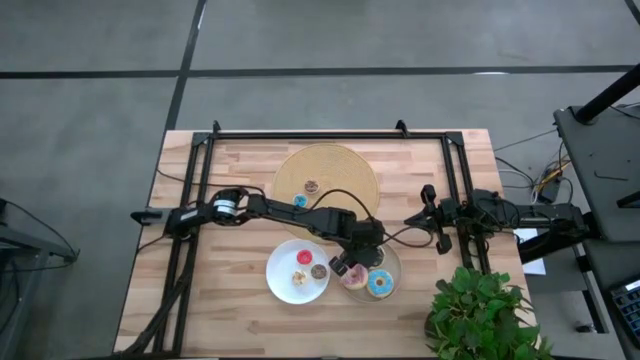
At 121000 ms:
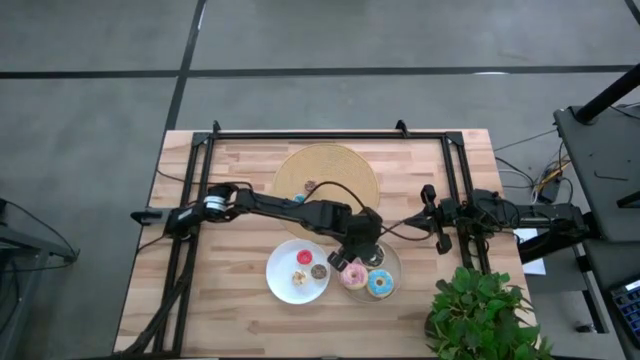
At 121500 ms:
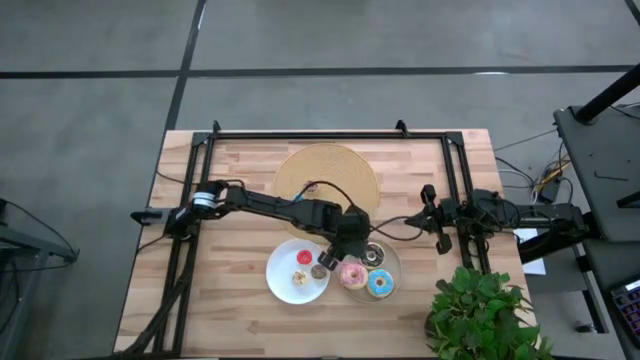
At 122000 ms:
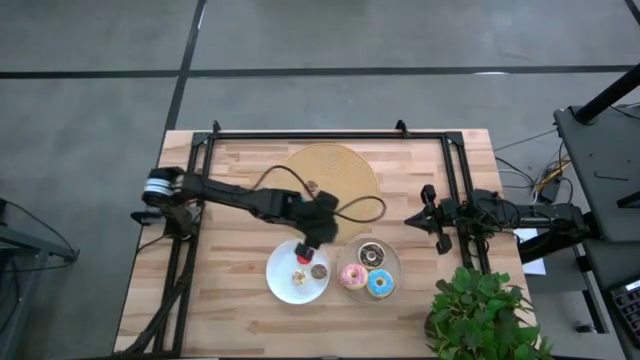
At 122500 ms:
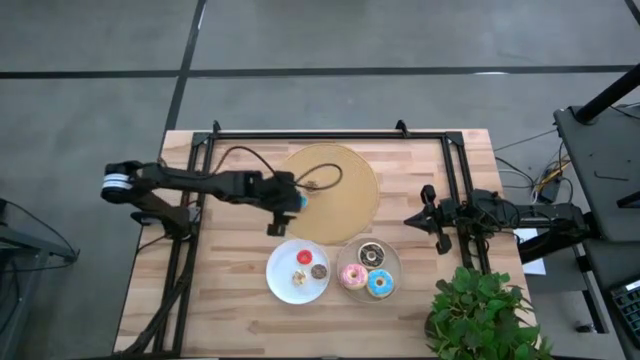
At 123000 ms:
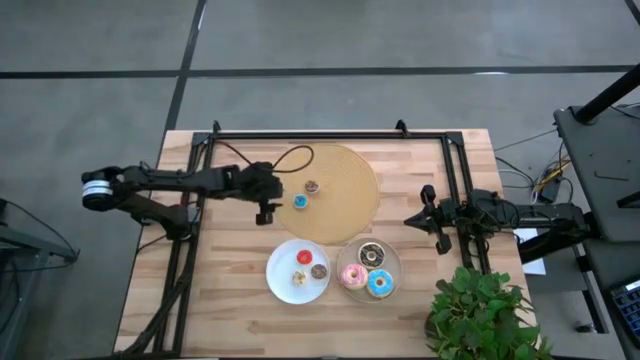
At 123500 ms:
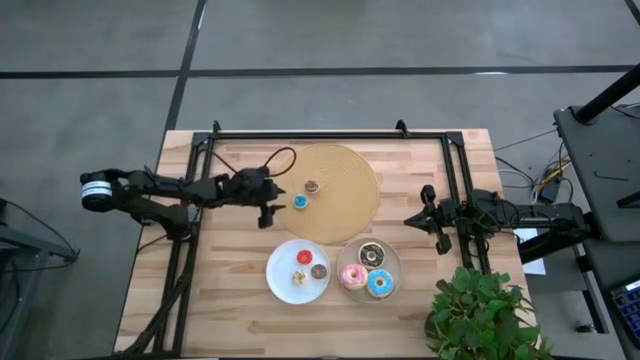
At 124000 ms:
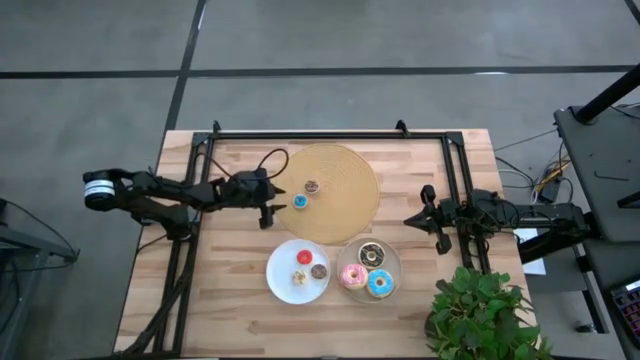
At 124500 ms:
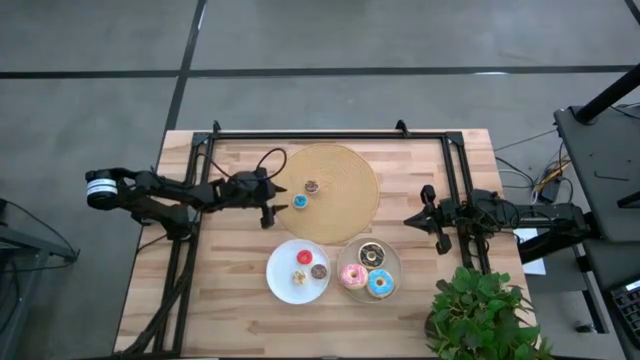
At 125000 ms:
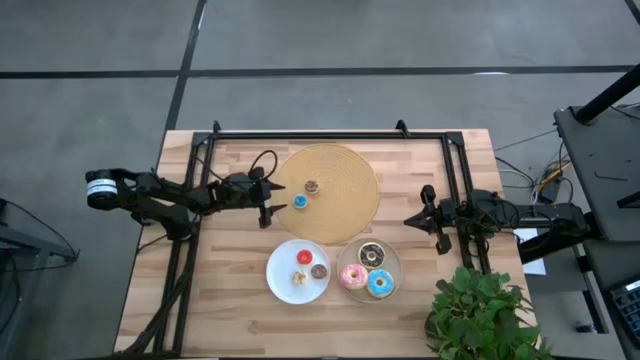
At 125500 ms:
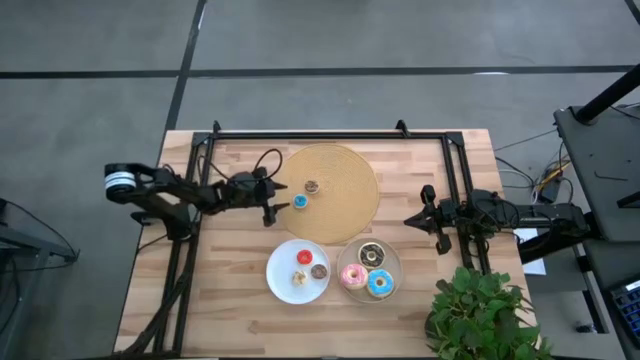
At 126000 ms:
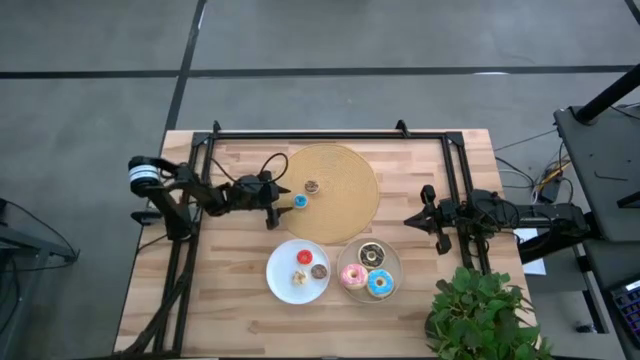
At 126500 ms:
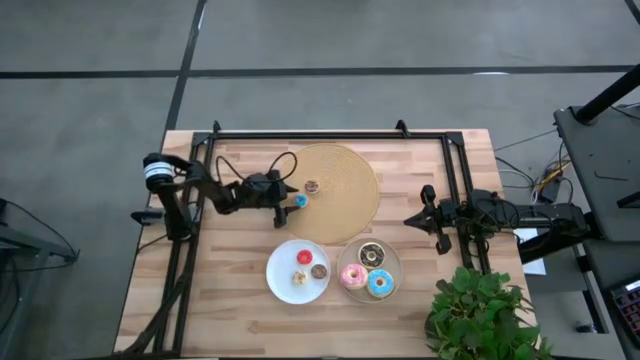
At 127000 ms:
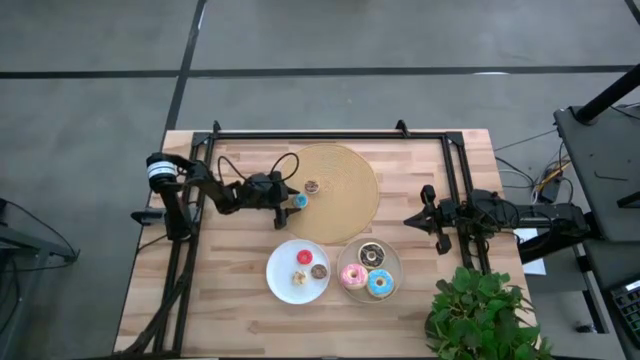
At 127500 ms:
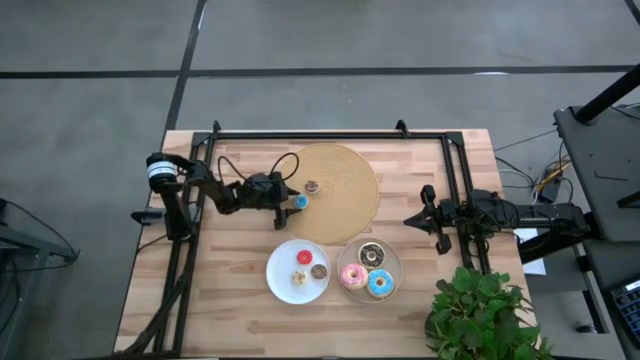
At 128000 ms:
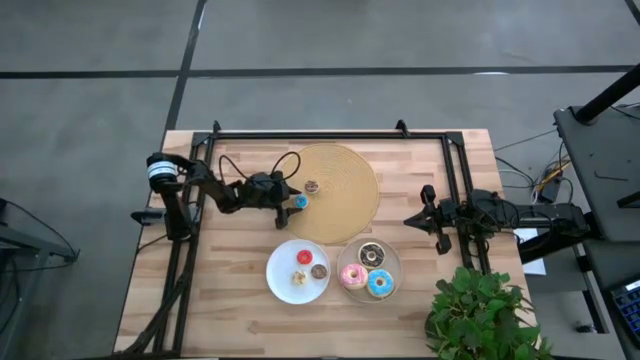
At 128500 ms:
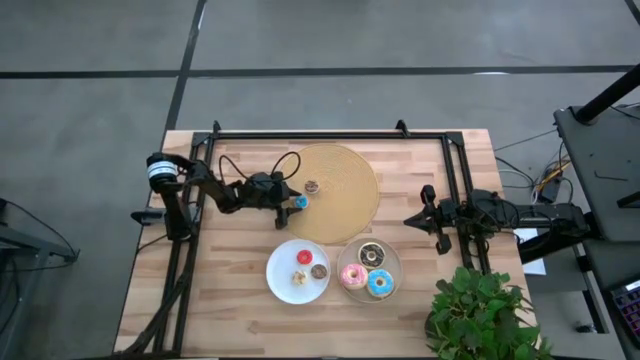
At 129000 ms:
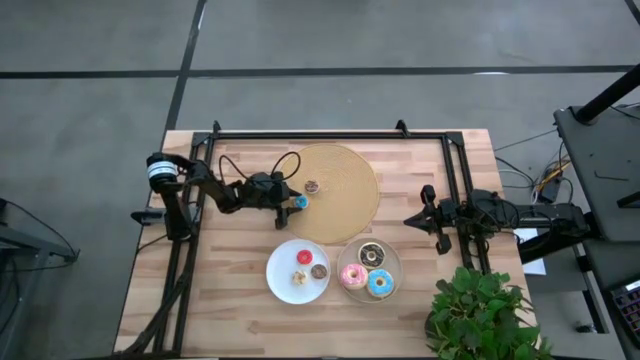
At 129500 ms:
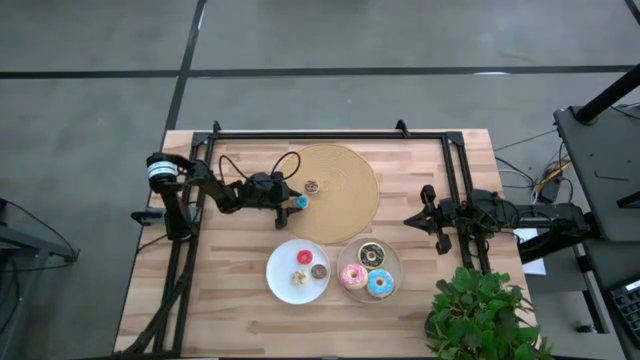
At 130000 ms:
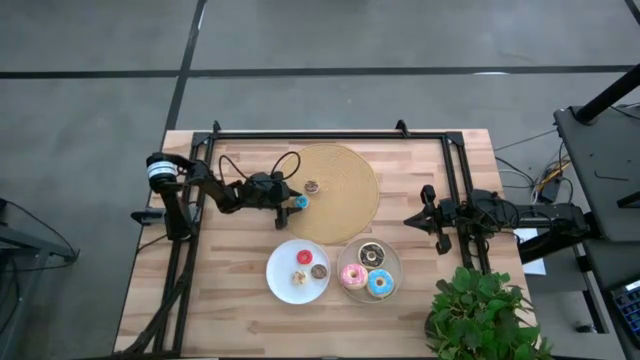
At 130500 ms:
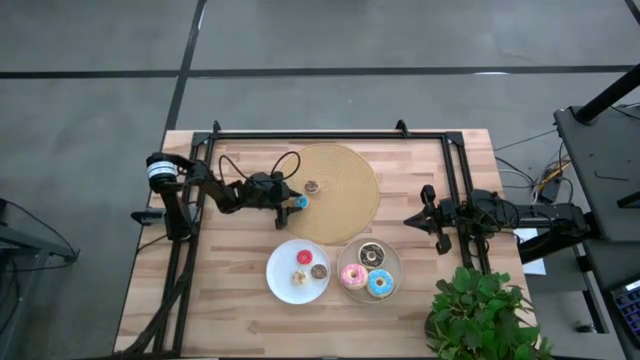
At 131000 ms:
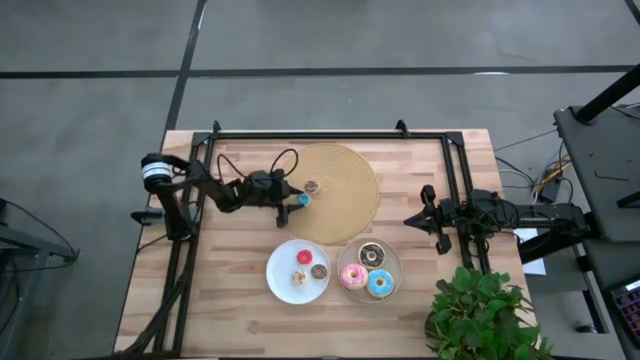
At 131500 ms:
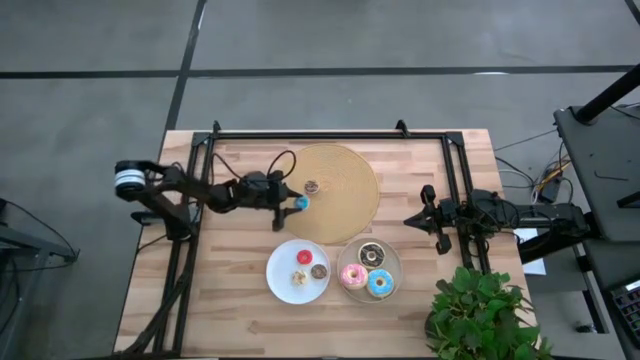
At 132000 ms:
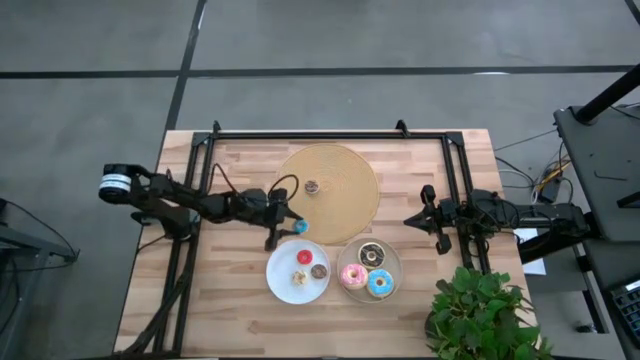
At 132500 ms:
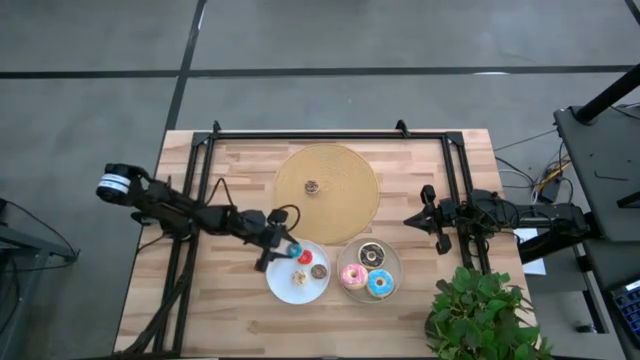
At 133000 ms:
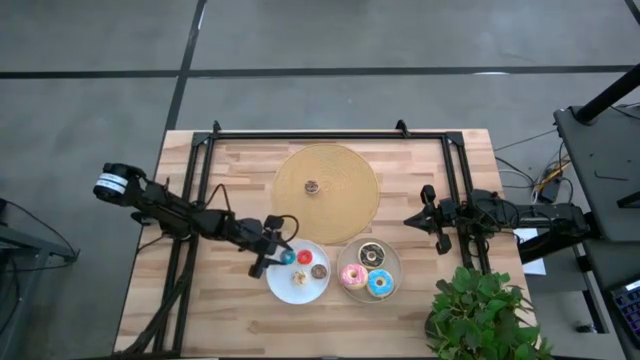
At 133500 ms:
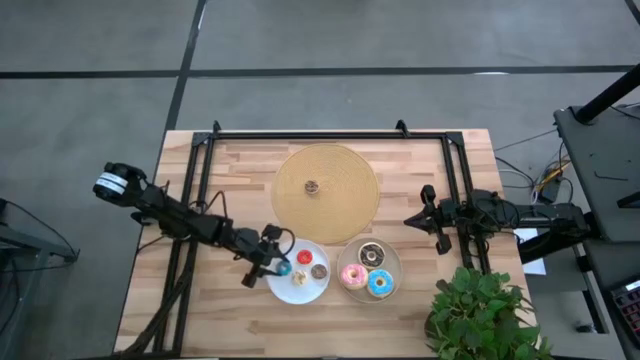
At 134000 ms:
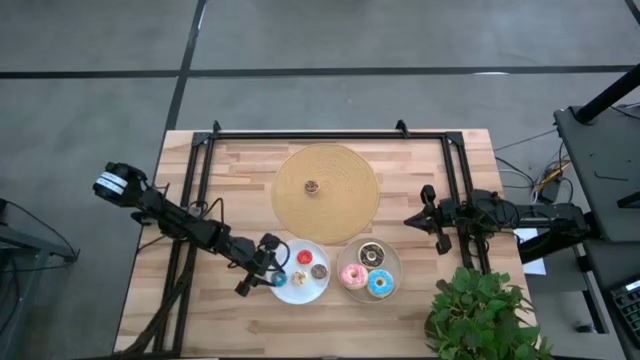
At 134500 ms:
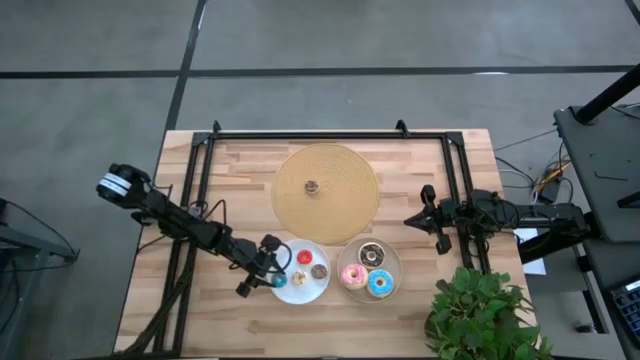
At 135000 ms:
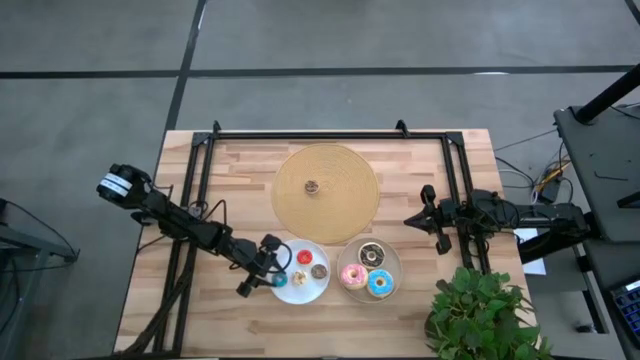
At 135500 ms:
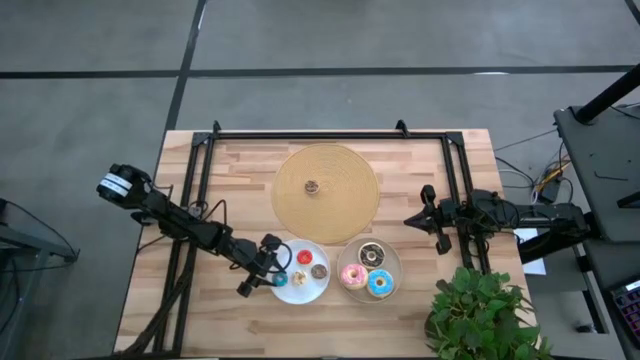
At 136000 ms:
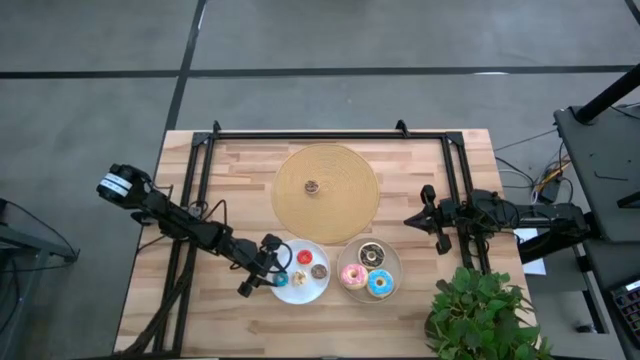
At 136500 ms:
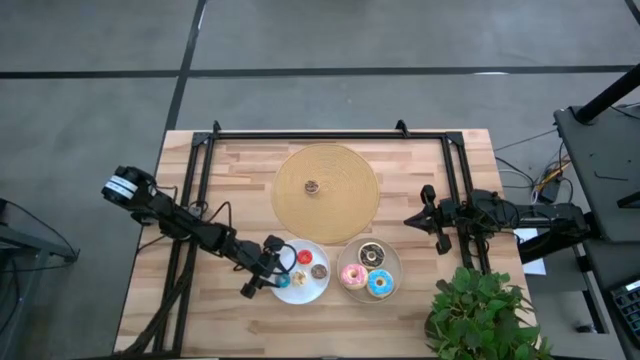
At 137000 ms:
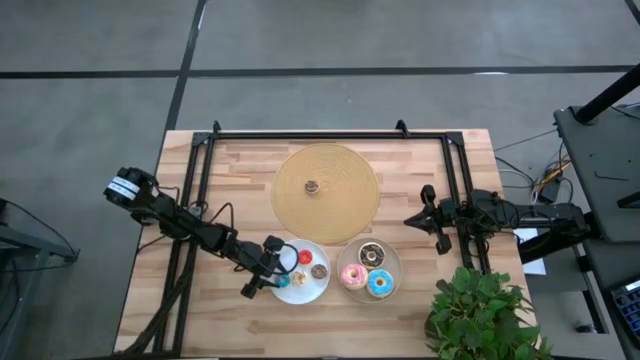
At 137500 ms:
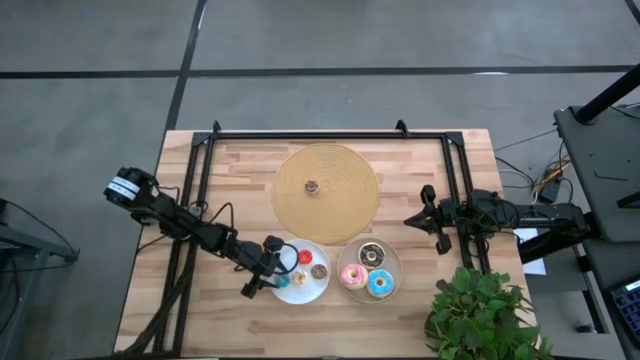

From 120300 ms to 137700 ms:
Task: Pick & Place donuts
Put the small blue donut on the white plate

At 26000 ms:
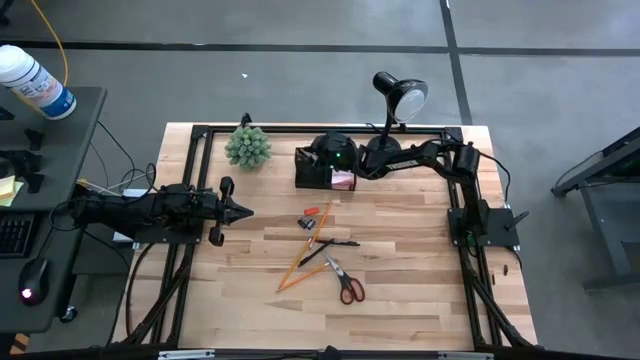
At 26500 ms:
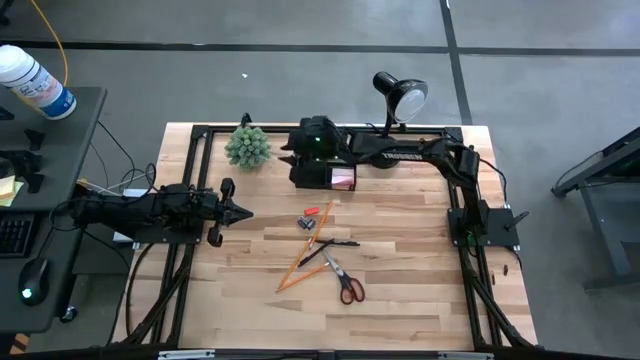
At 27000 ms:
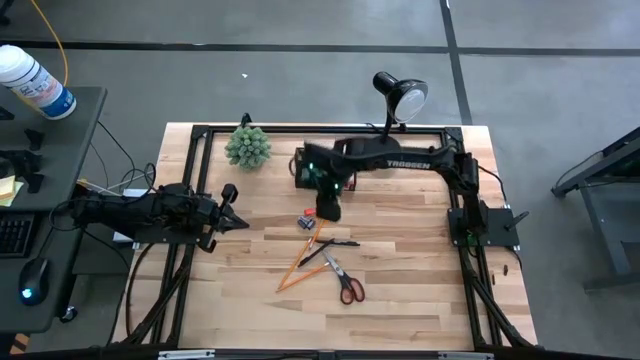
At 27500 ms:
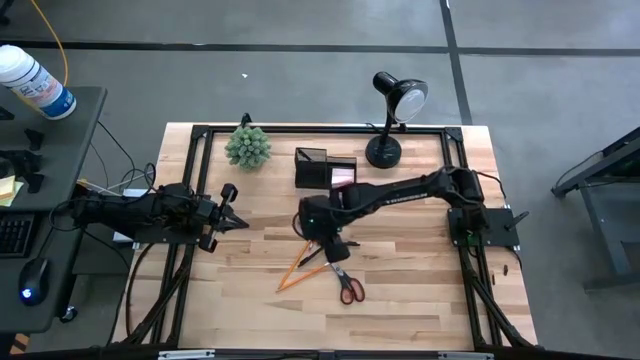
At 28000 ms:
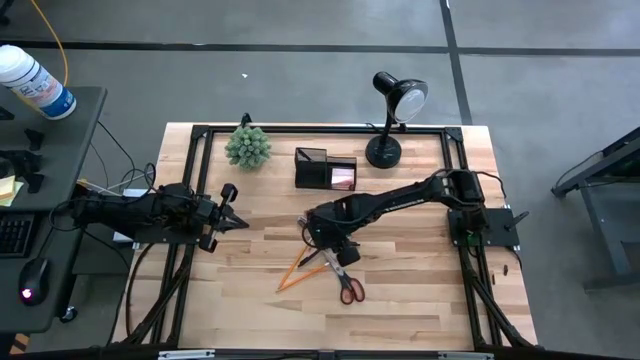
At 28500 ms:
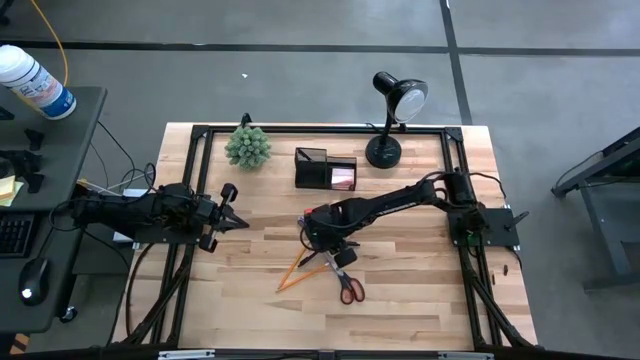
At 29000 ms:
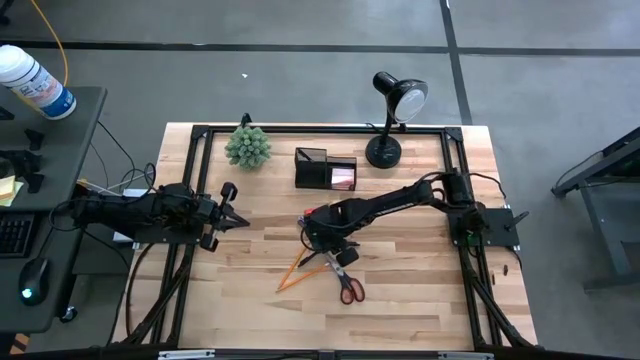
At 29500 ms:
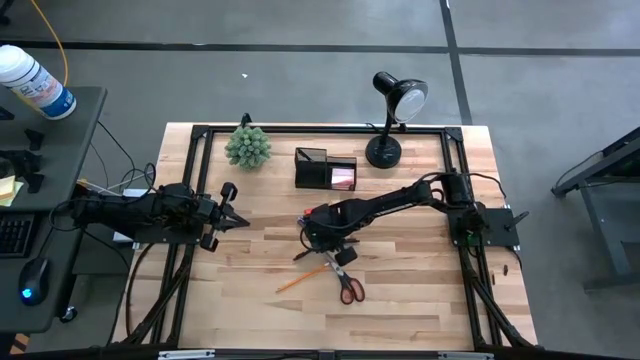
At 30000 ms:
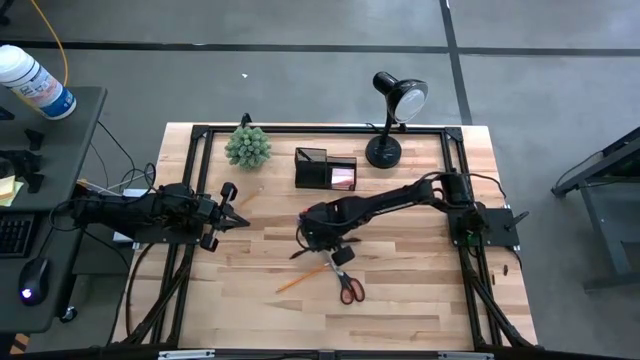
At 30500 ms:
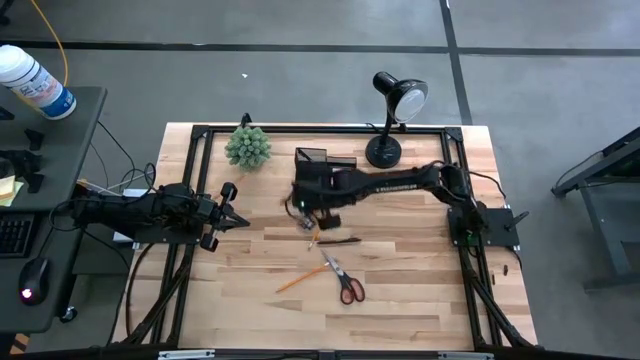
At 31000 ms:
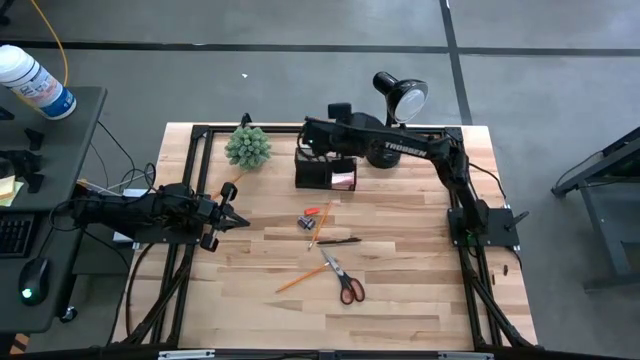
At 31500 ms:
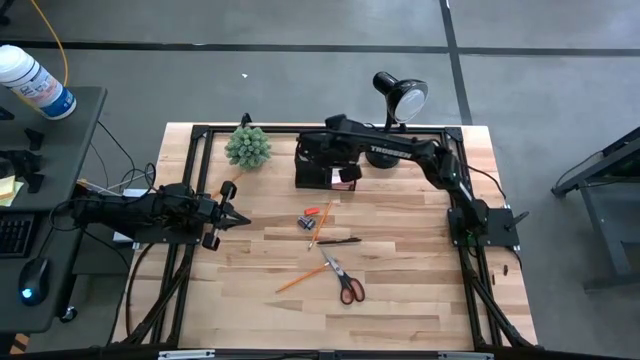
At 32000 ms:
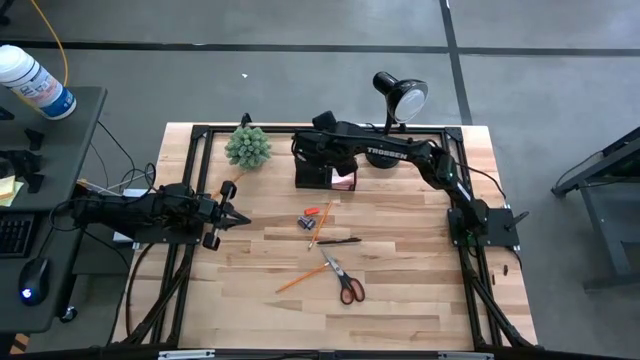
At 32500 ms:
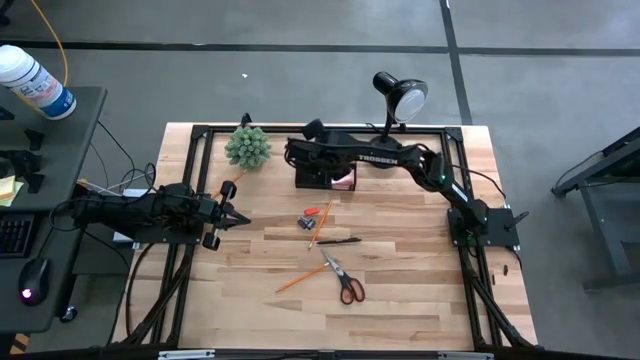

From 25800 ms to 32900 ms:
Task: Pick and place office supplies into organizer
Put the bottom black pen into the desk organizer
